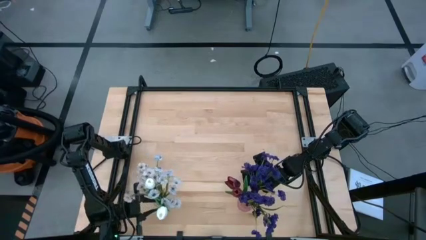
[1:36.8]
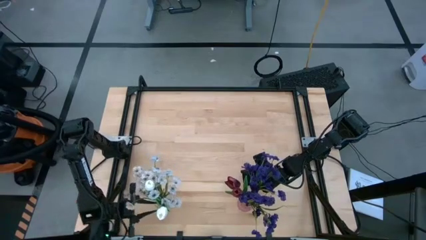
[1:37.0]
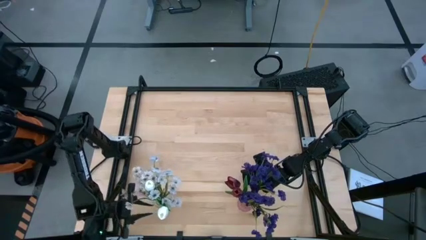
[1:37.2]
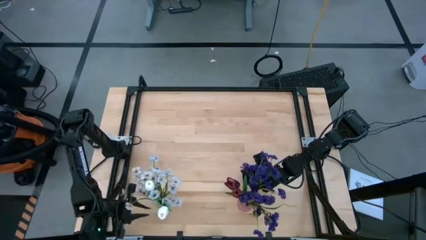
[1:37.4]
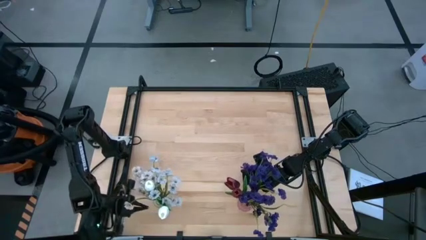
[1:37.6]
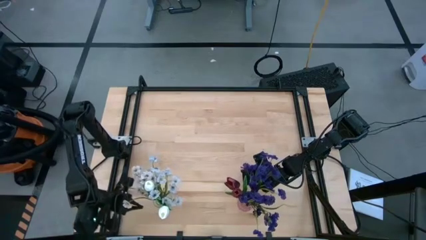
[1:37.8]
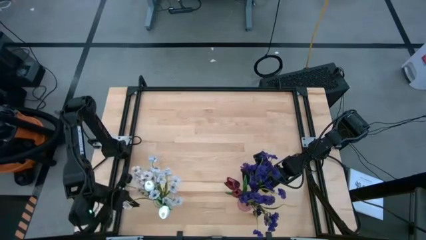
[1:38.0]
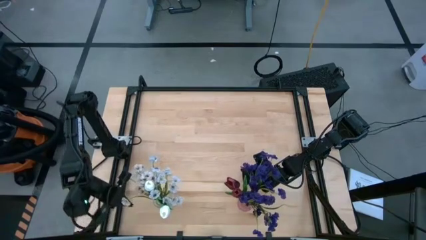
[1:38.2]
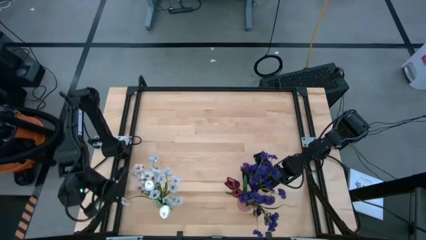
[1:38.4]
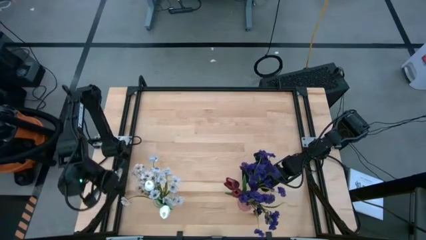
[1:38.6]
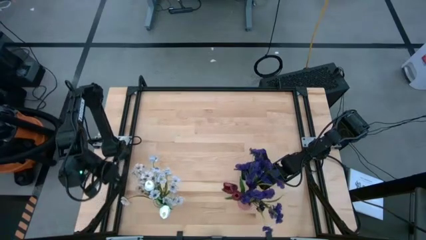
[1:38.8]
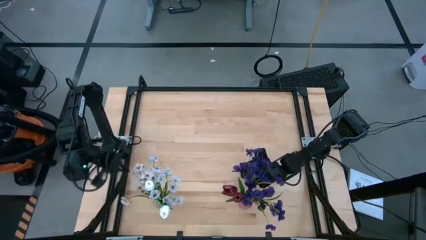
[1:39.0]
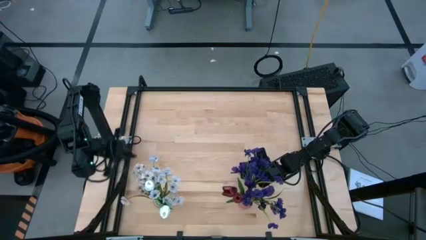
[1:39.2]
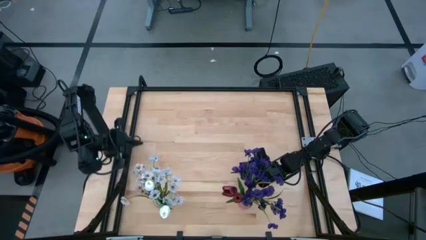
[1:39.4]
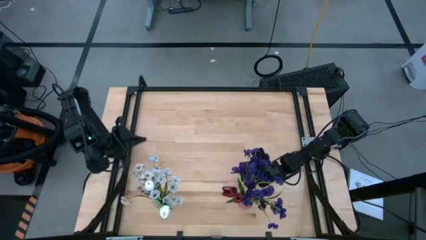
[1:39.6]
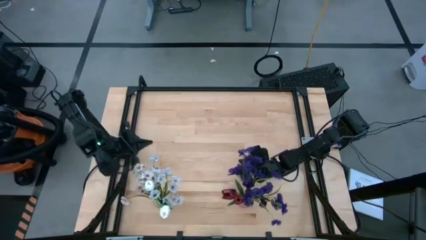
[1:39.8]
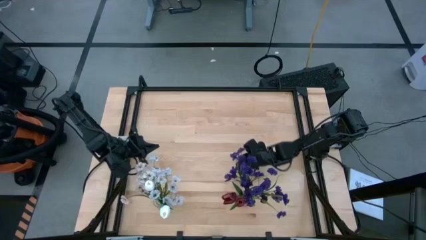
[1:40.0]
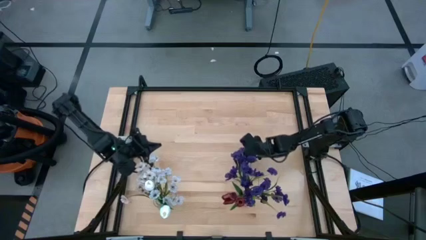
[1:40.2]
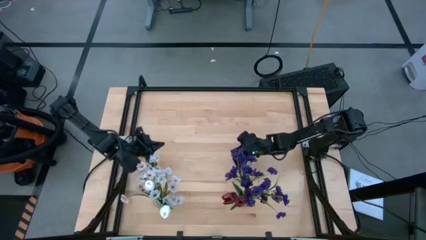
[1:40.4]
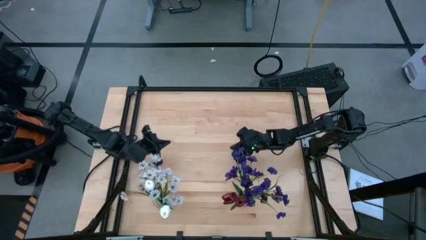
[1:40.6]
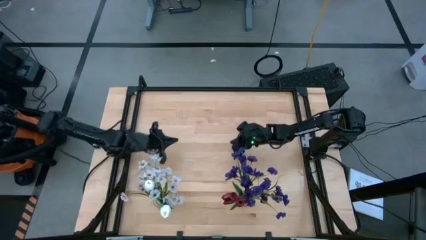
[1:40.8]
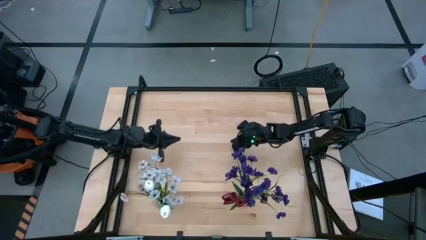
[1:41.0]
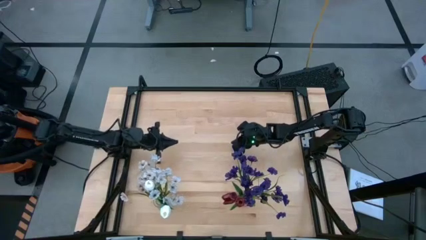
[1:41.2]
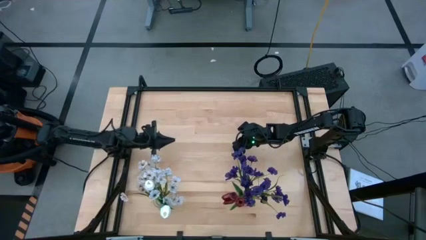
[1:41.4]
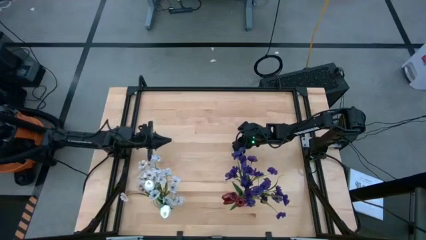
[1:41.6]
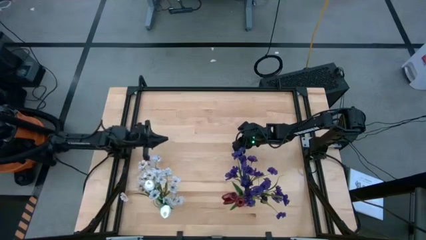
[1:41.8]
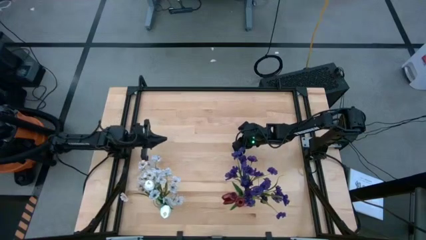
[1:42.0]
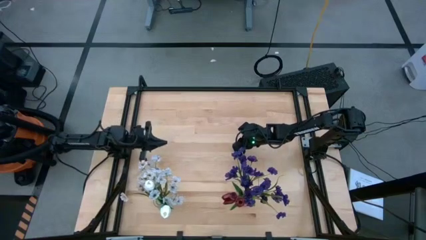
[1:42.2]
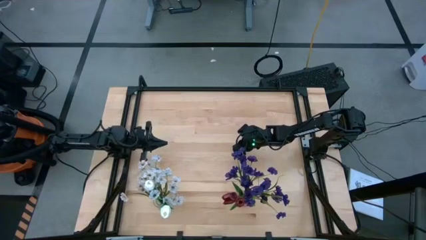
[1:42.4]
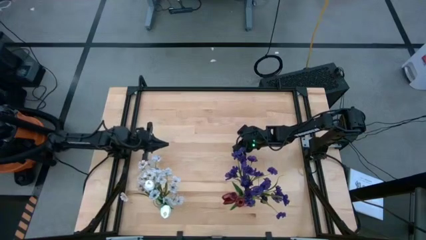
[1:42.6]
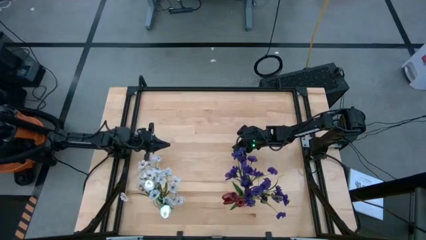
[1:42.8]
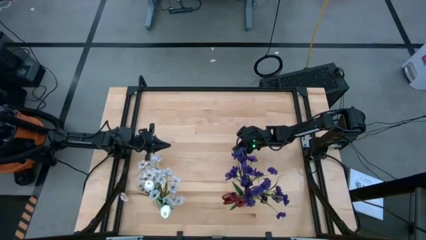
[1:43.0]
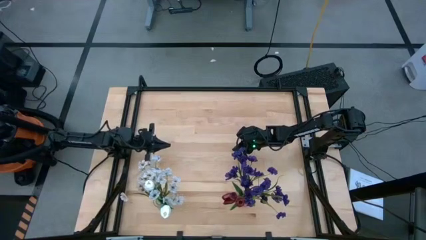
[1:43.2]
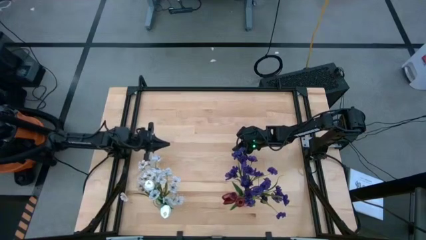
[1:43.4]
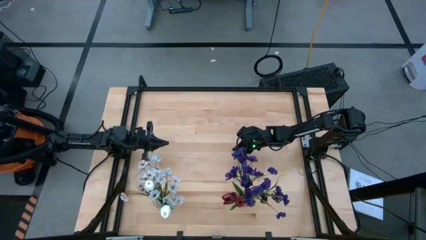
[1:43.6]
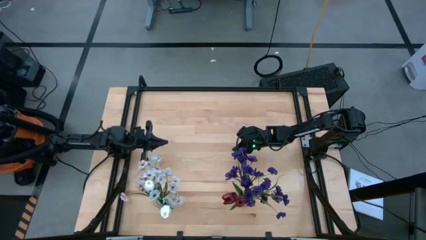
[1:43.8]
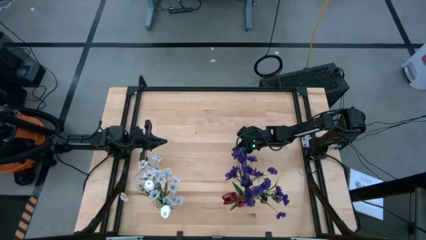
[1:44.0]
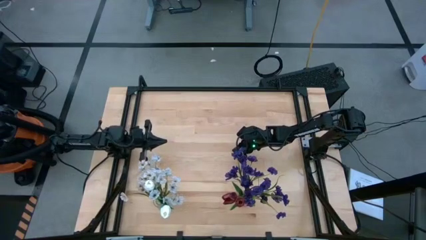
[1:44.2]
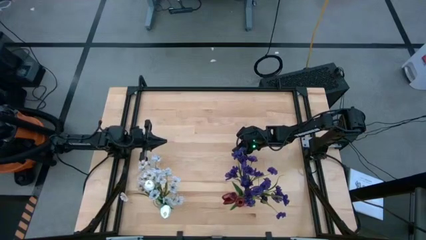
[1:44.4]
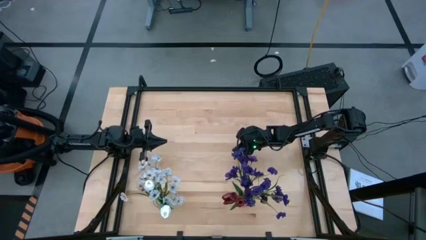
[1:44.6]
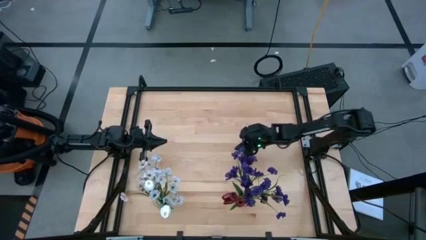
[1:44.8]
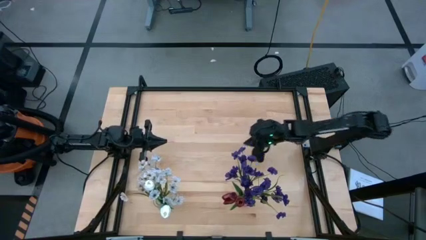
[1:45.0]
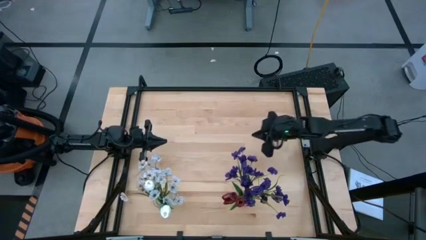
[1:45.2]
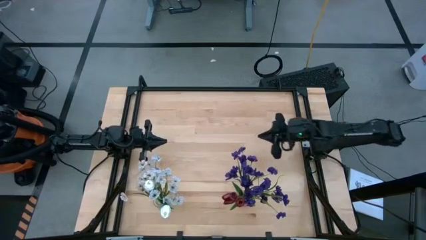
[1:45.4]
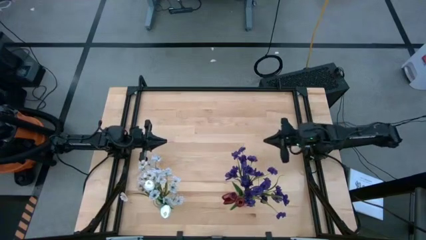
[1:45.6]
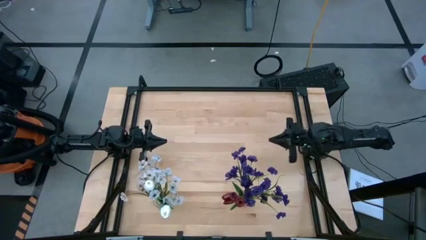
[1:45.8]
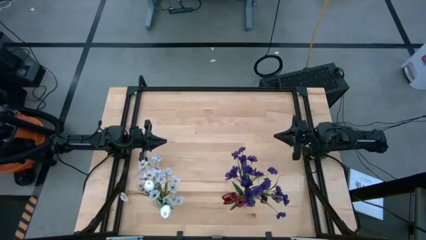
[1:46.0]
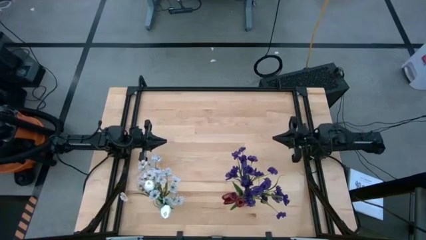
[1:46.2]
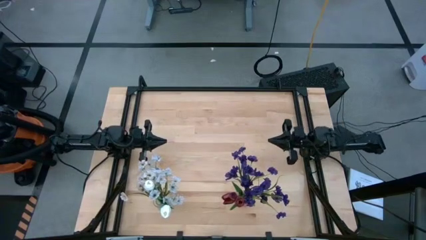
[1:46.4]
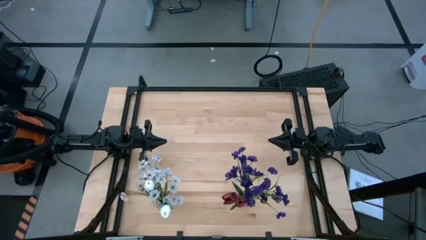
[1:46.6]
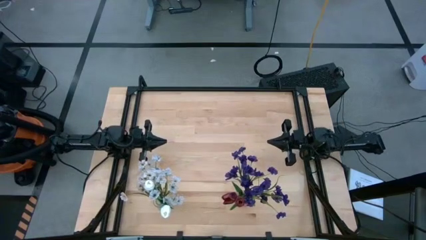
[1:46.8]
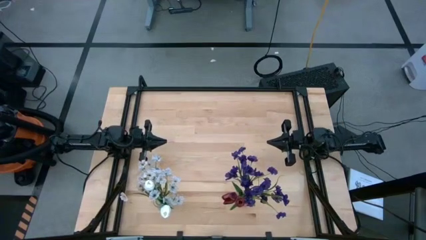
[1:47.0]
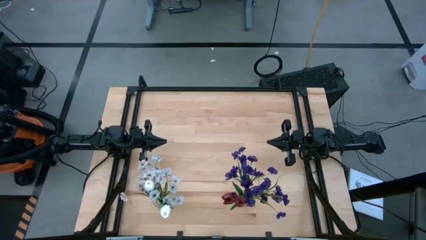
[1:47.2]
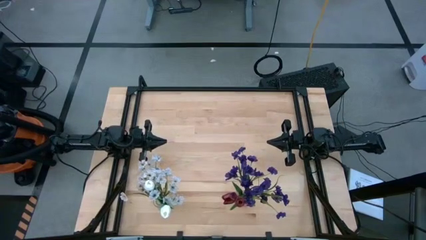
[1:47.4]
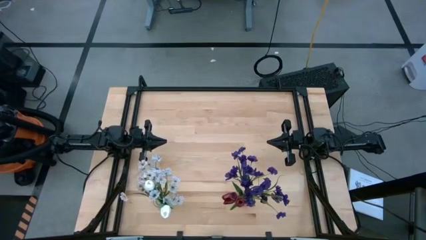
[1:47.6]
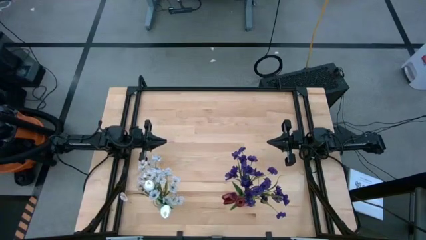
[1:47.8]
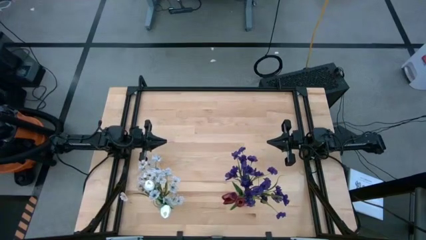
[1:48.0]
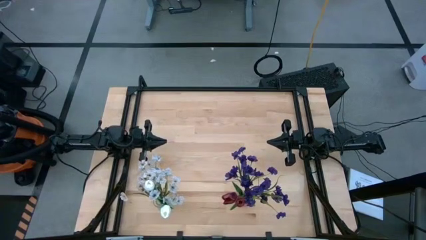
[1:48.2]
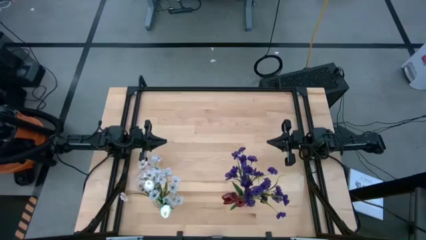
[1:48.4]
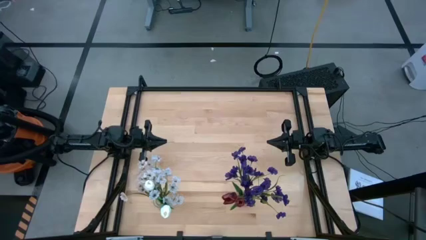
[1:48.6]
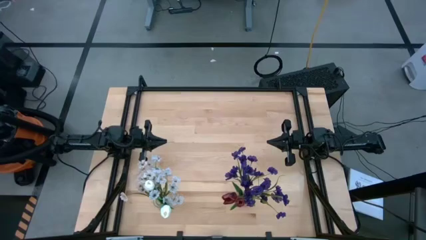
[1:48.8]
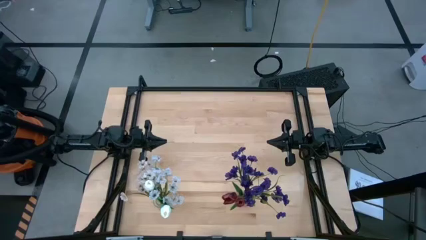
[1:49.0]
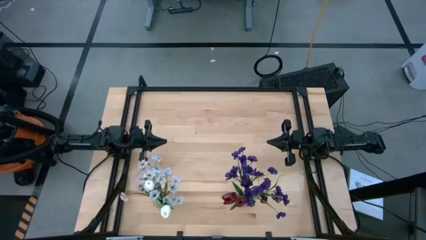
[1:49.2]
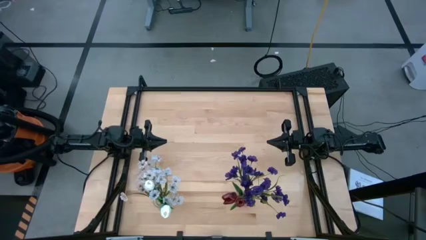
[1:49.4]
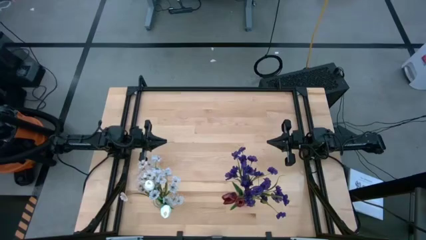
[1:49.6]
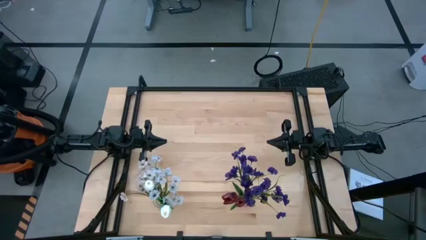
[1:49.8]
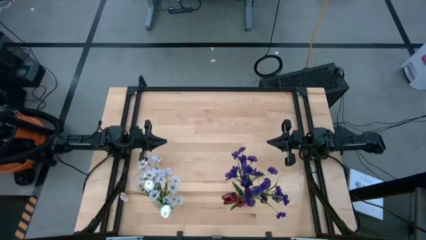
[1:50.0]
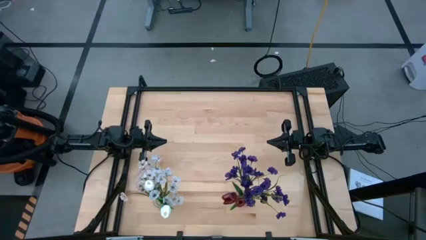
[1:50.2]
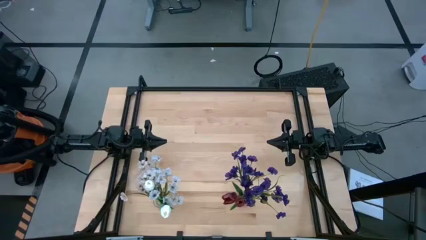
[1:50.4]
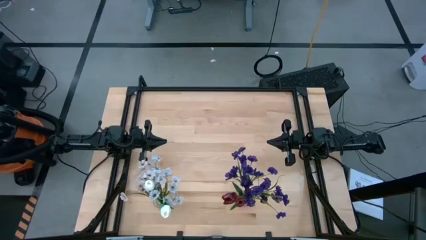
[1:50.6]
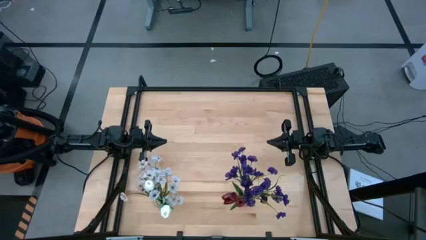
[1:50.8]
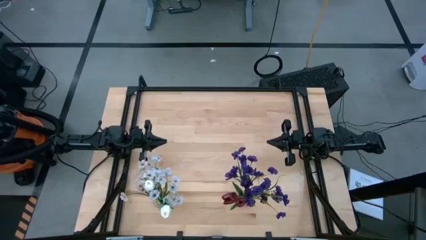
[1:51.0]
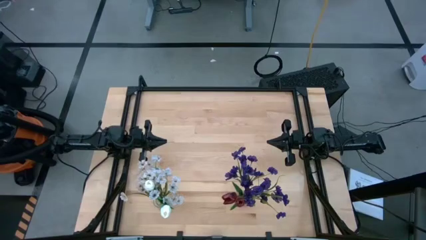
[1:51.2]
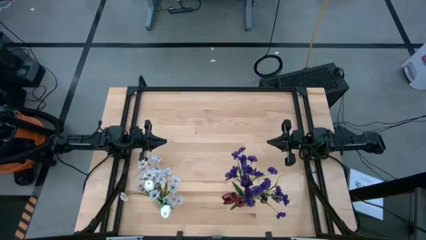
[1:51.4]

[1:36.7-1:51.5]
Task: Sort flowers into vase by color
Return to Home Position

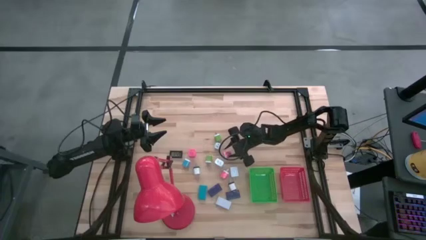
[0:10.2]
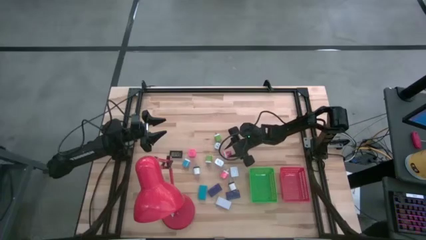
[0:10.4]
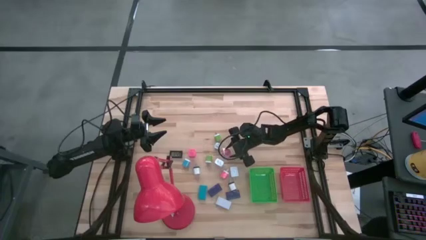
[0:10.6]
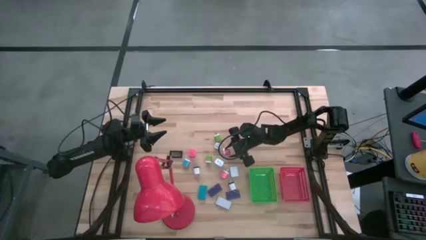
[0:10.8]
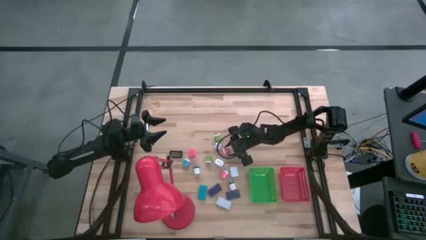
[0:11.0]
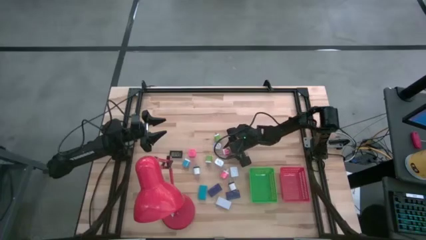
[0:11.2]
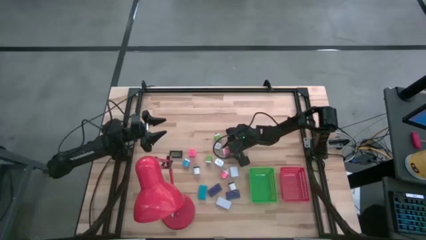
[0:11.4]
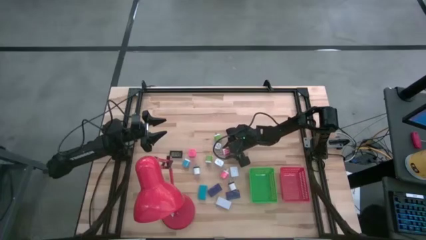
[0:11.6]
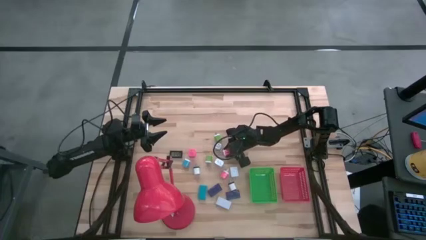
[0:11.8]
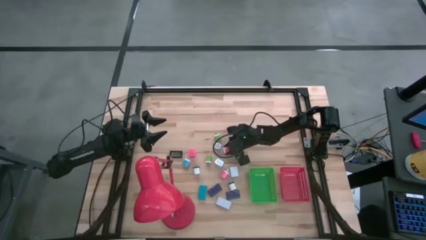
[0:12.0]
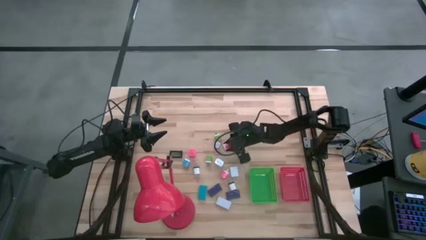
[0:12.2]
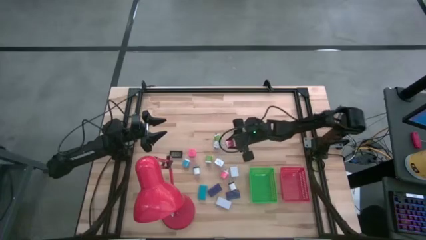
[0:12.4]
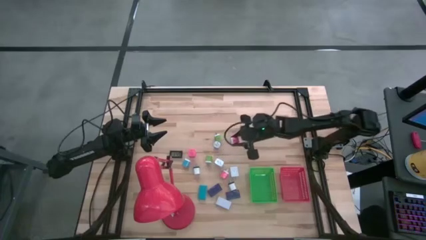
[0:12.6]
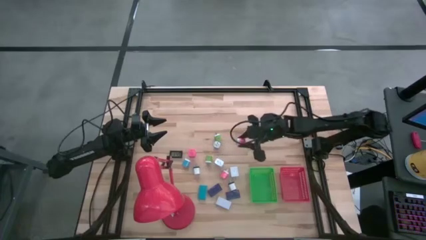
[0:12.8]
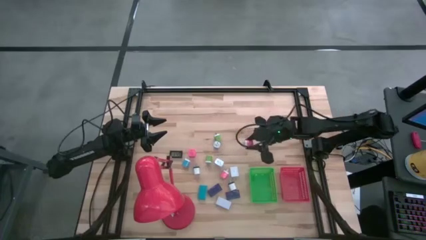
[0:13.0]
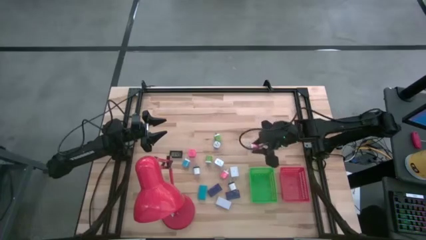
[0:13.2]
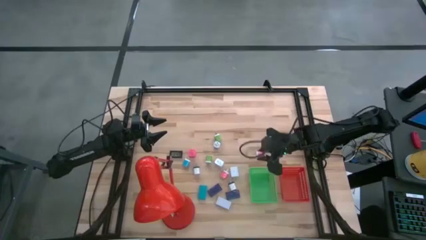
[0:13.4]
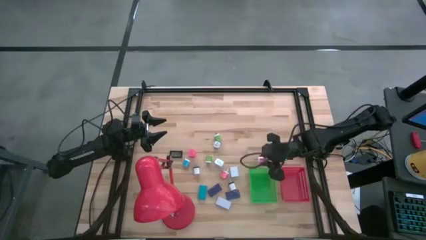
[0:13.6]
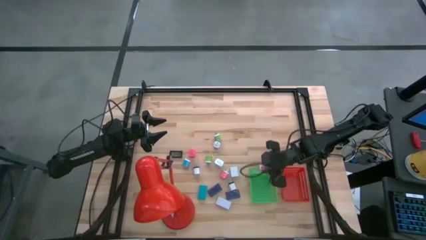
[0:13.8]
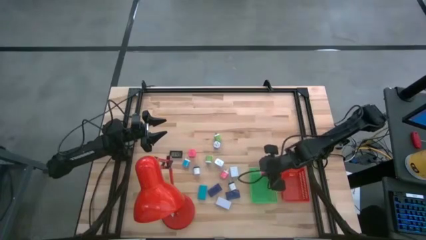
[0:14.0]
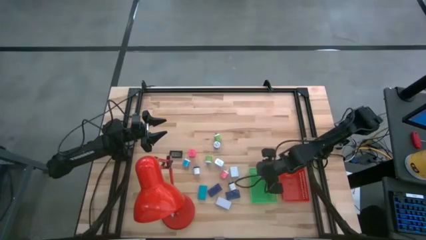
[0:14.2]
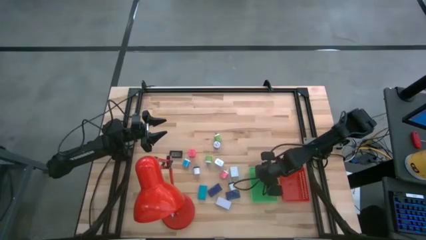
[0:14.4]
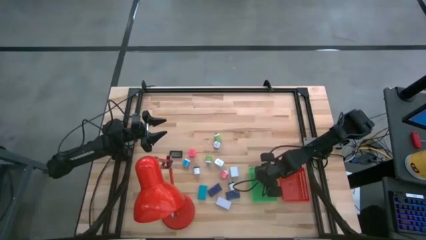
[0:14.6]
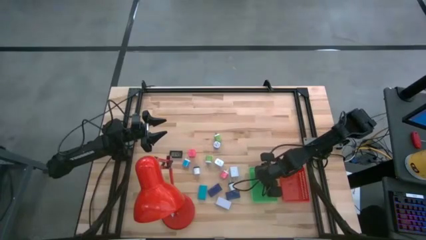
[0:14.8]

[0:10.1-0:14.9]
Task: Pick & Place Office items
Put the pink charger adapter into the green basket
